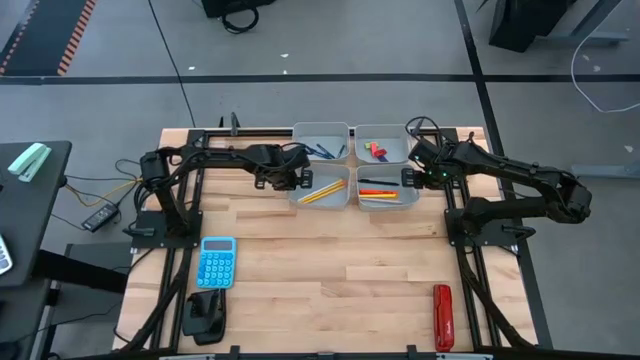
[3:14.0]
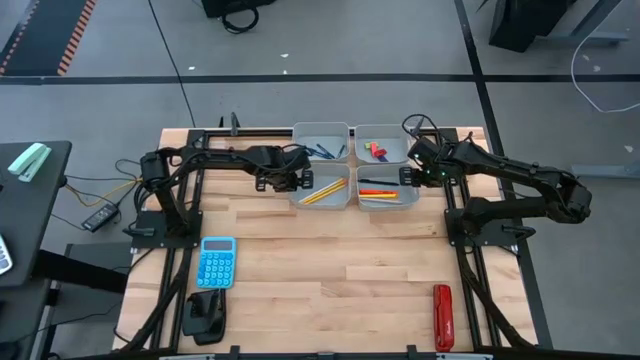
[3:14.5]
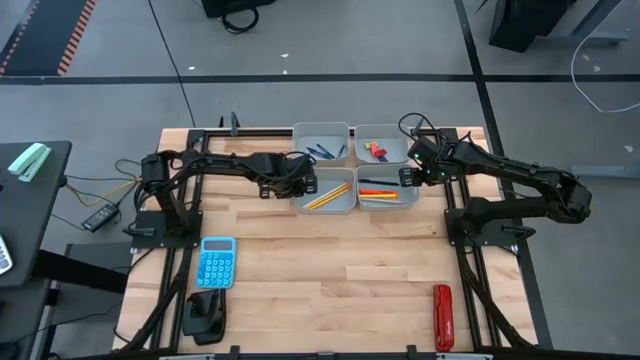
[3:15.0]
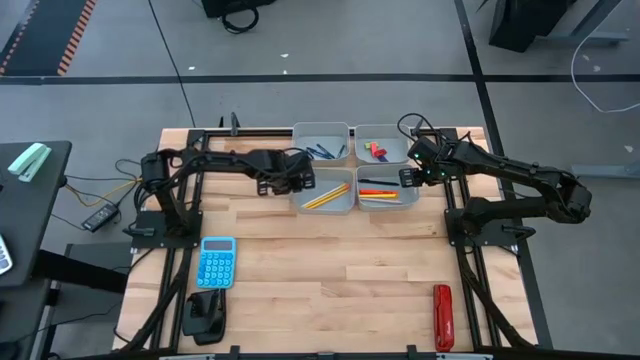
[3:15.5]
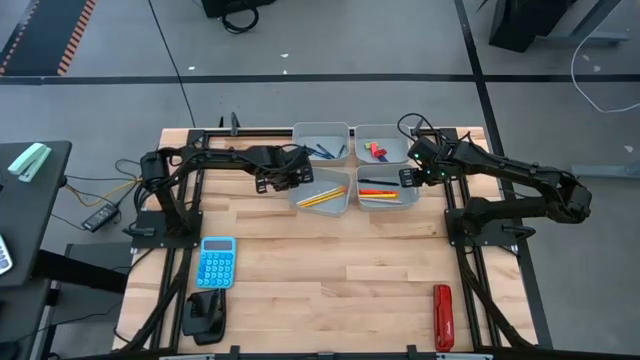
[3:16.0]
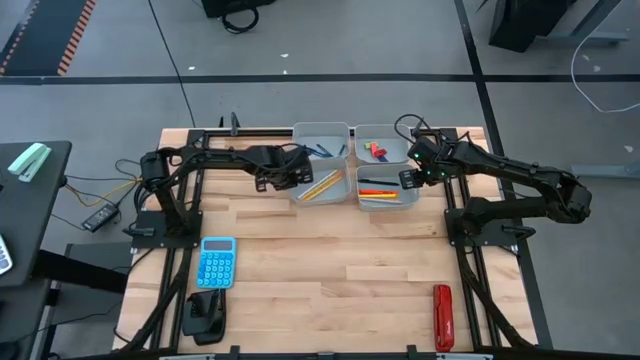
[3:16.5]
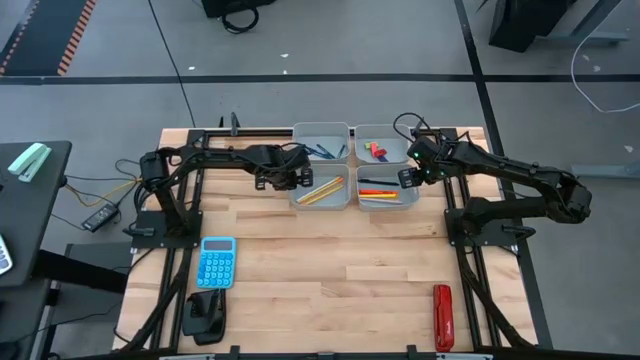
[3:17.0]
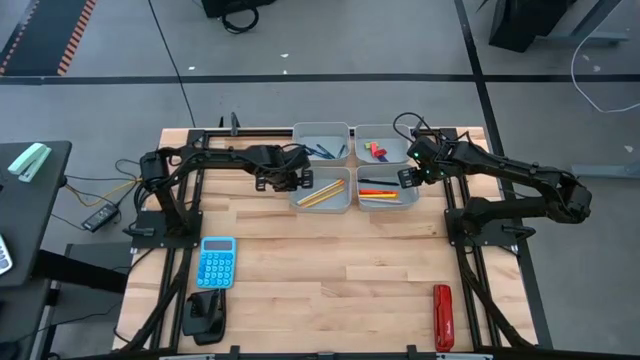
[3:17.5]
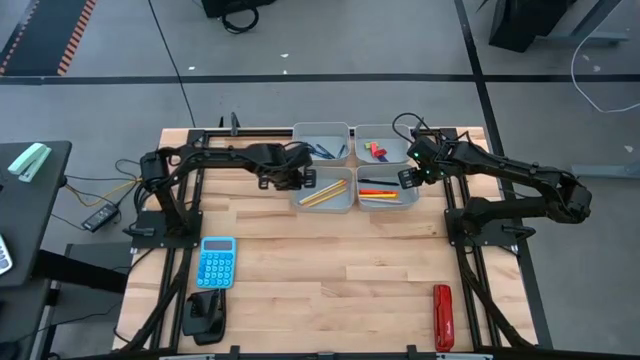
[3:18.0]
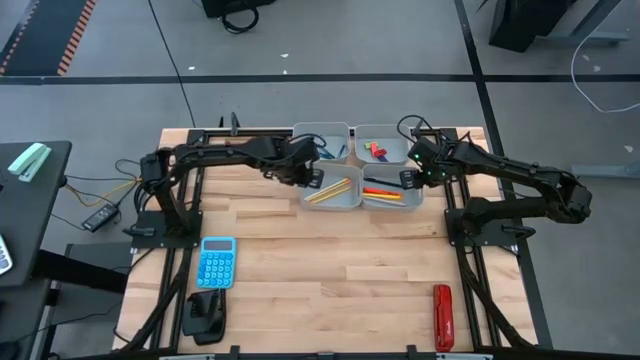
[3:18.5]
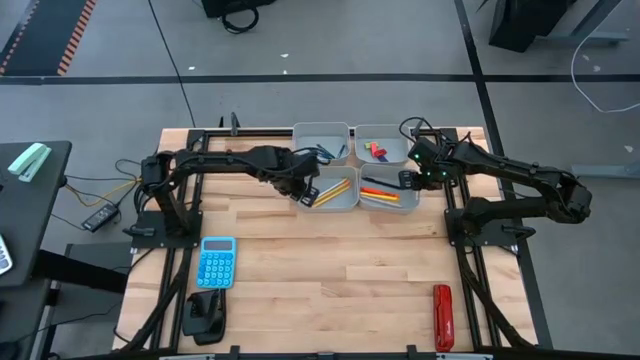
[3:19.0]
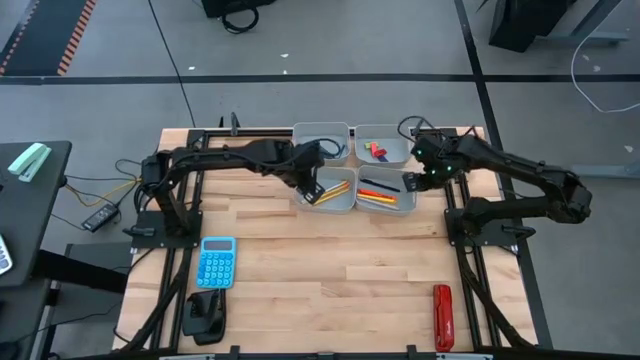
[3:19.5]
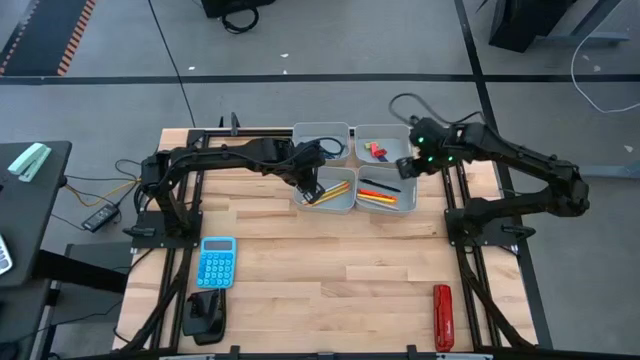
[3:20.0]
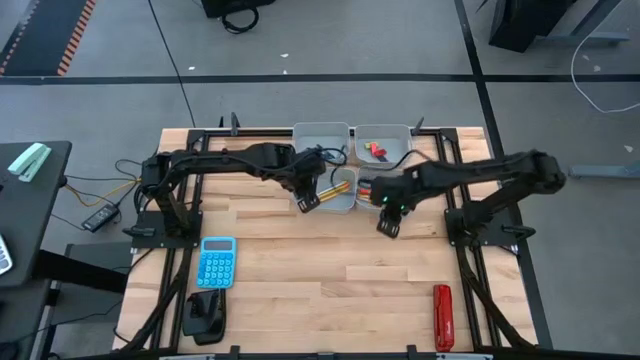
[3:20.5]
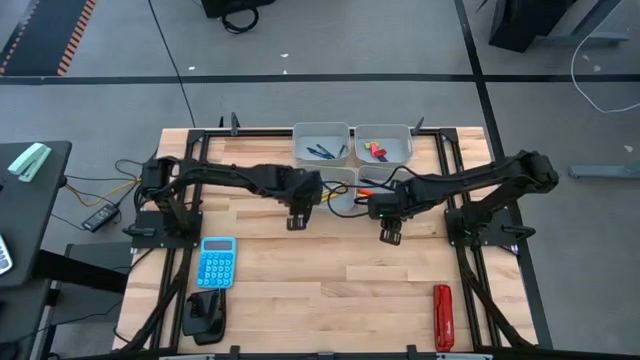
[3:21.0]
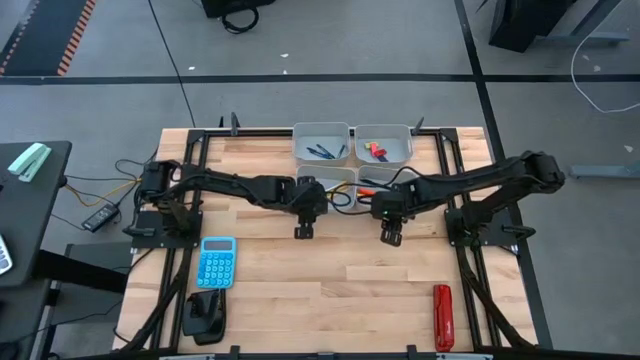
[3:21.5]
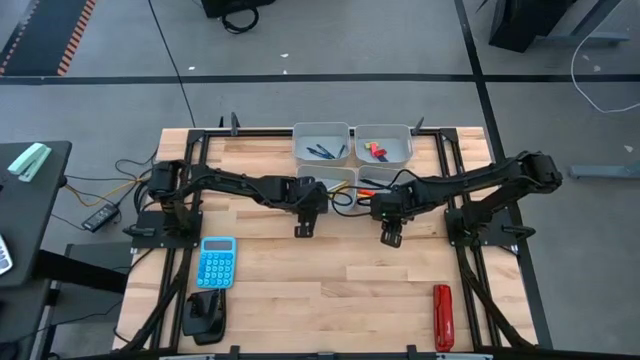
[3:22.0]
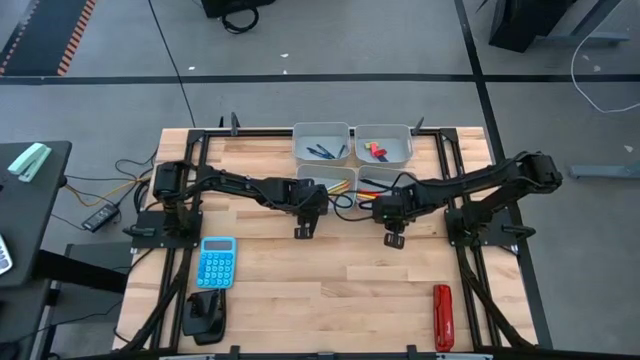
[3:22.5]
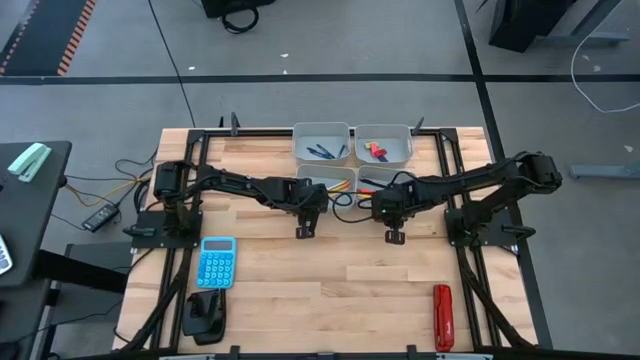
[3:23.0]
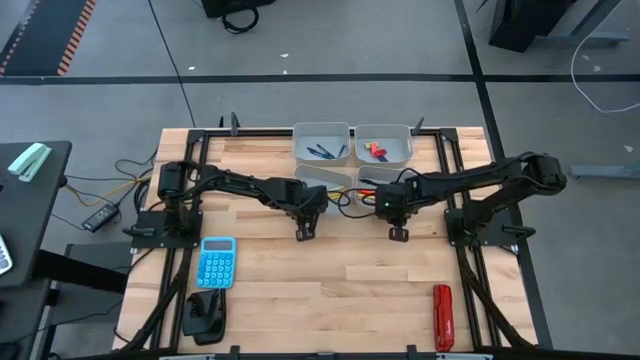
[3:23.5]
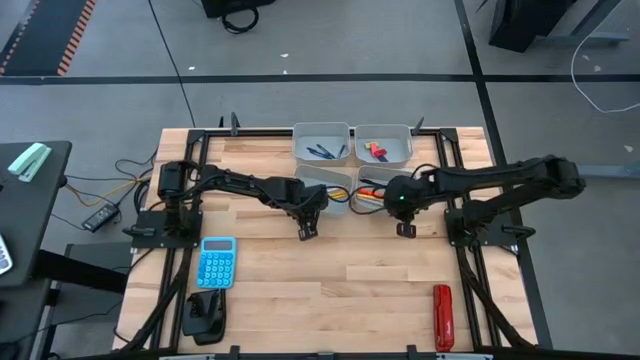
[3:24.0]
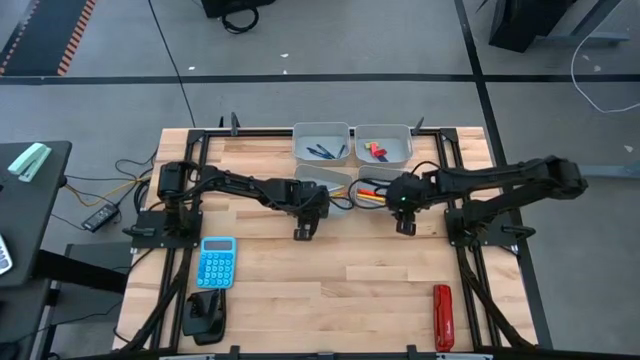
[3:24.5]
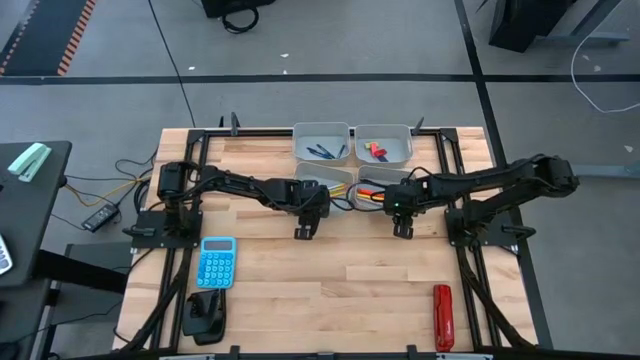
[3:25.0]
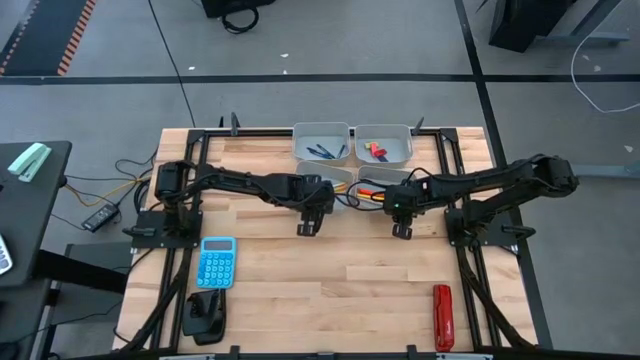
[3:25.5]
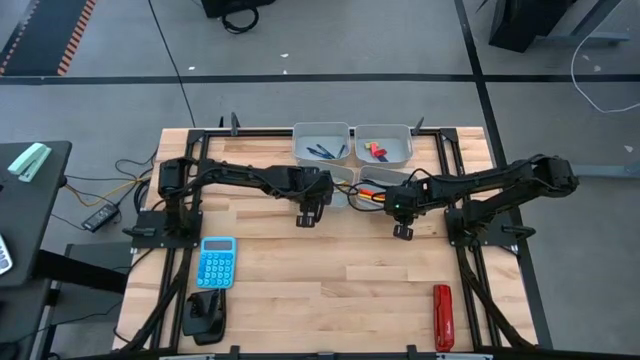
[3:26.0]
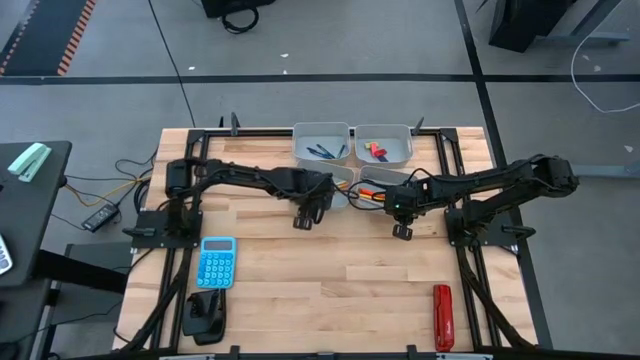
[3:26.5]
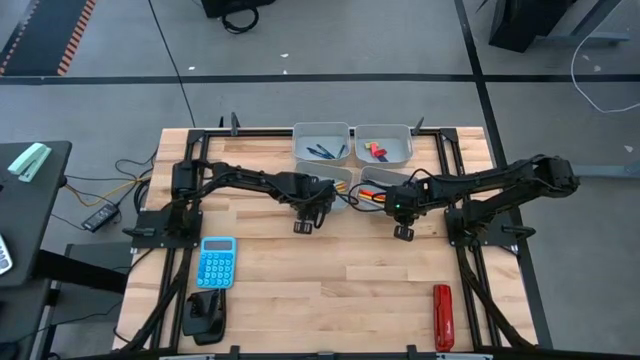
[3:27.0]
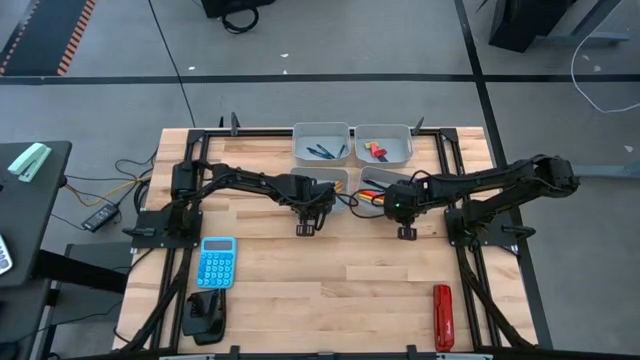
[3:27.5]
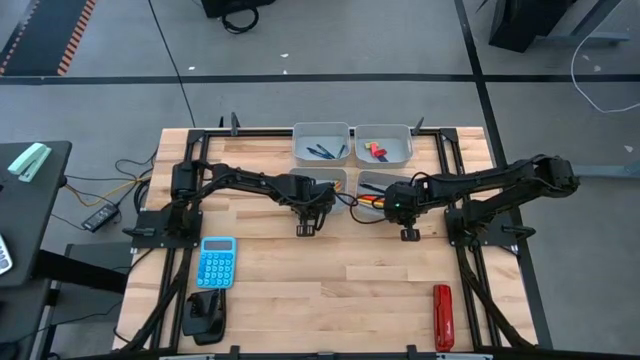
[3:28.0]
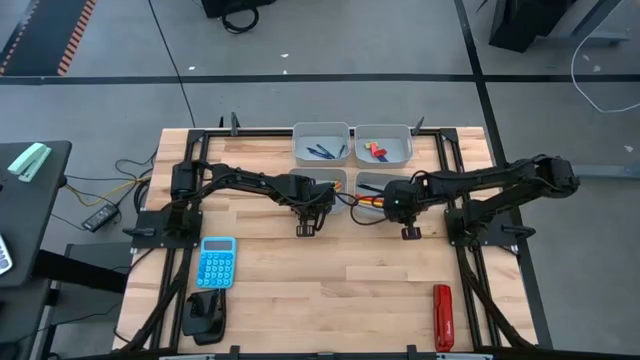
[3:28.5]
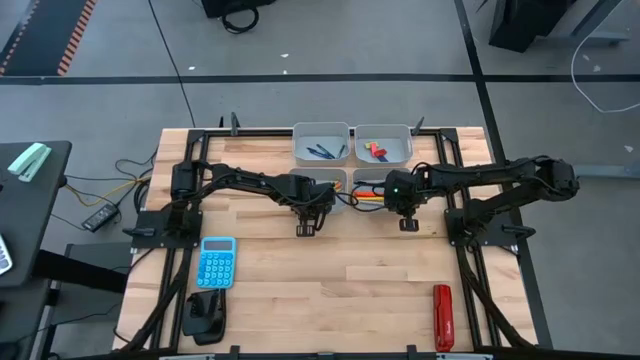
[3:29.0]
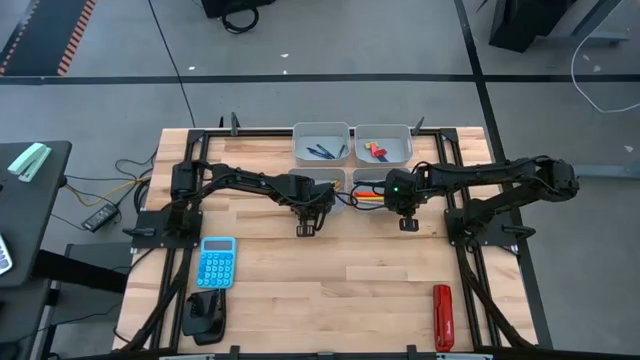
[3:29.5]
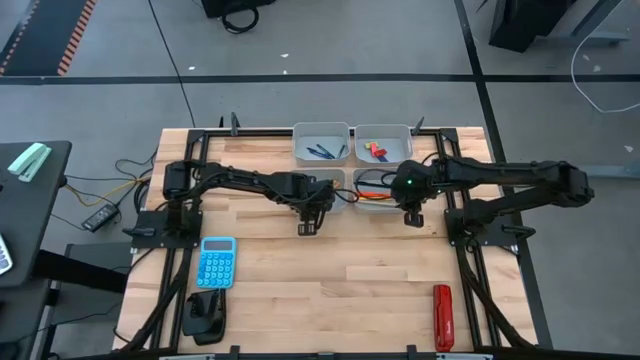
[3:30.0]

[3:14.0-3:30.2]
Task: Sort crayons/erasers/pens/pencils in bins
Adjust the gray bins

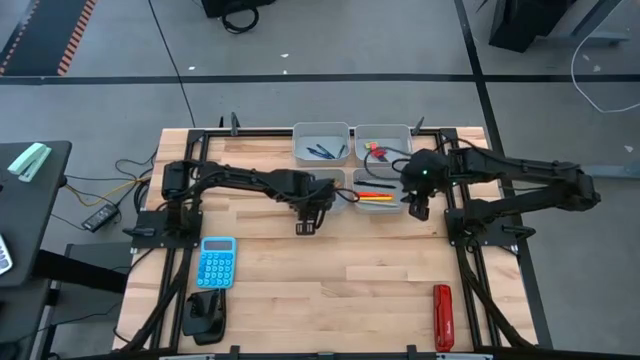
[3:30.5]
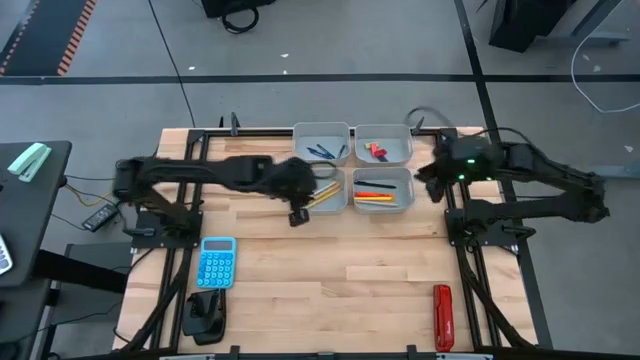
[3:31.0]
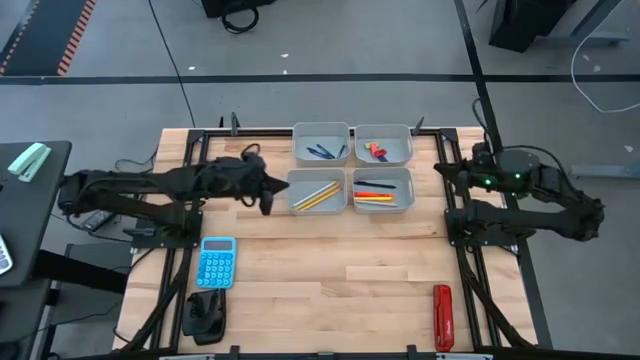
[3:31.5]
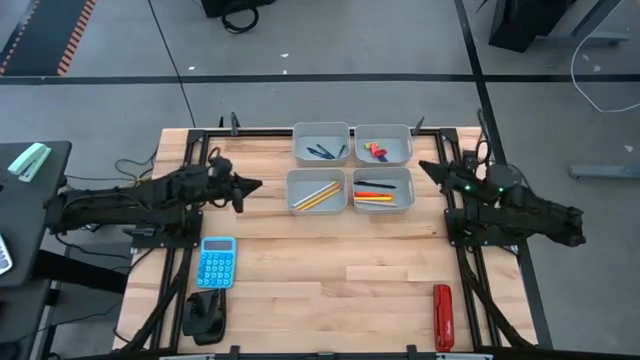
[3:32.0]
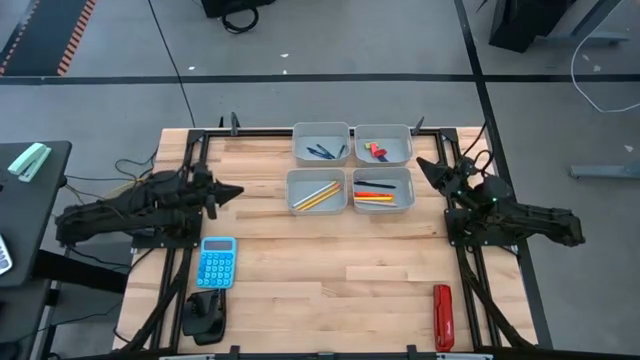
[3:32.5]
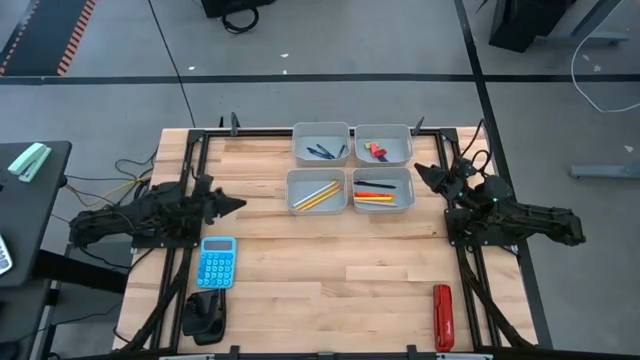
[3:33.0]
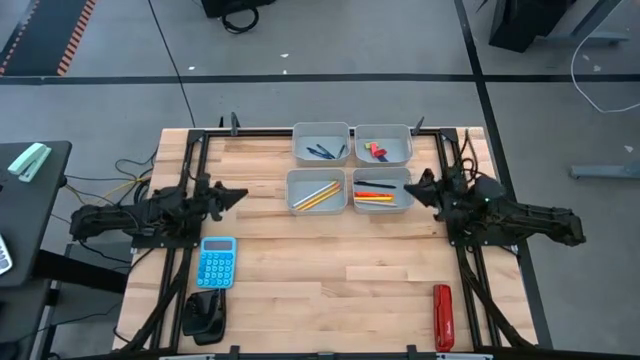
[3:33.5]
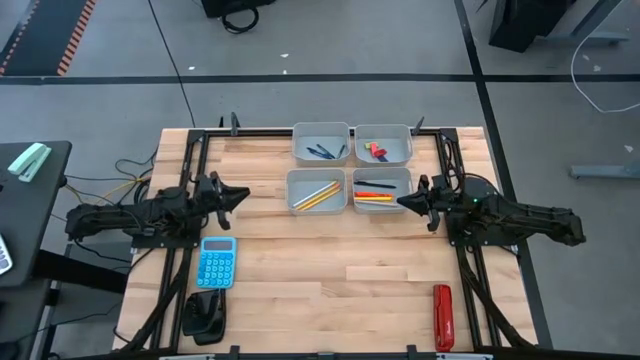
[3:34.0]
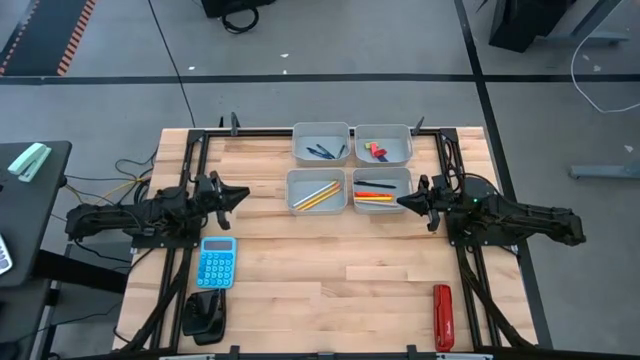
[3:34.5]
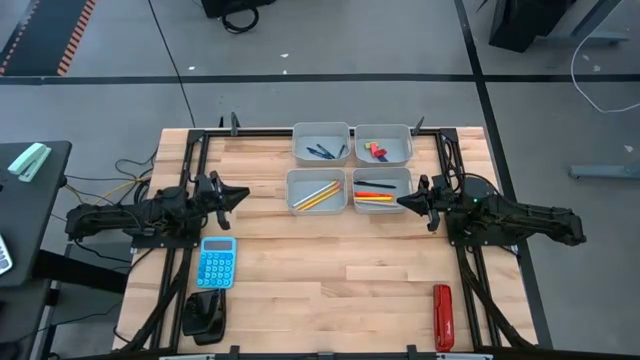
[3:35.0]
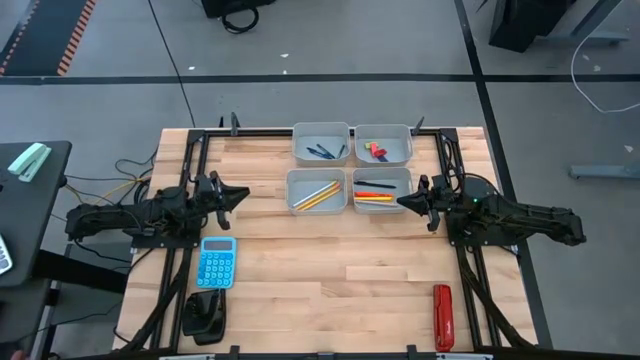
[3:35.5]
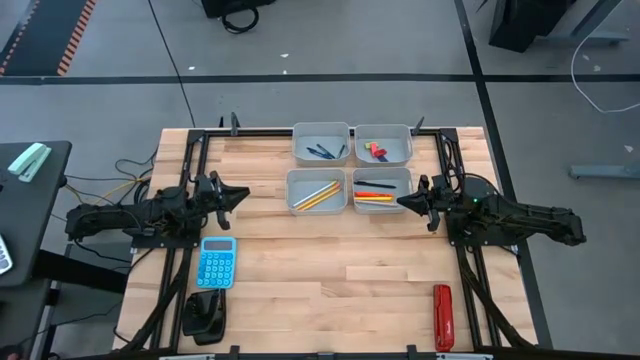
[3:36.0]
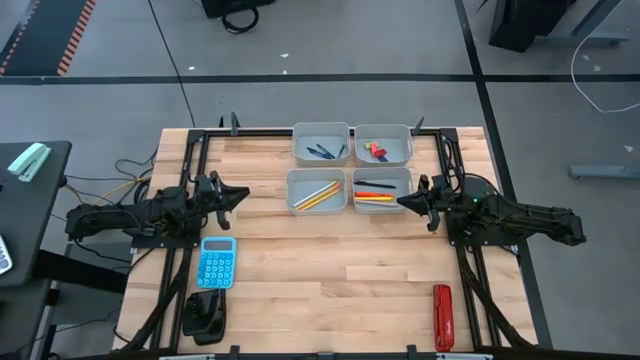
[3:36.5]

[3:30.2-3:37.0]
Return to Home Position
